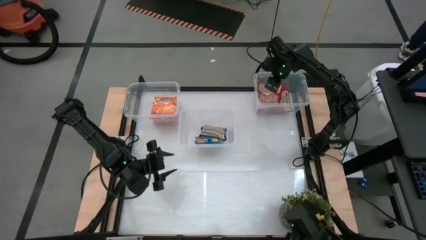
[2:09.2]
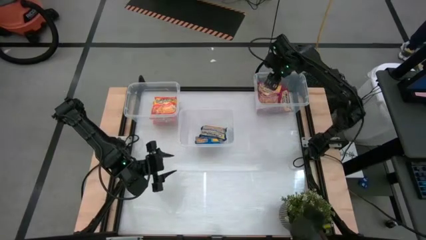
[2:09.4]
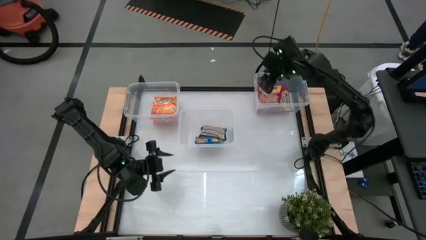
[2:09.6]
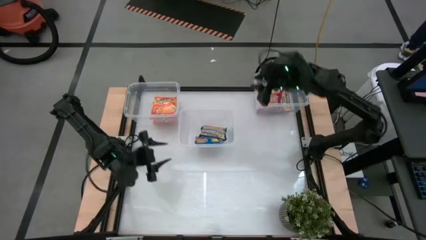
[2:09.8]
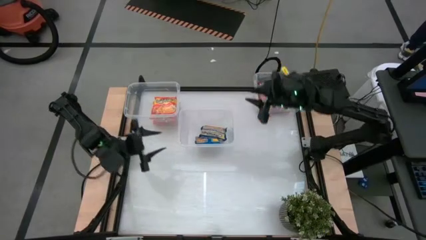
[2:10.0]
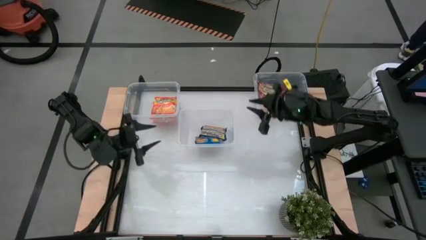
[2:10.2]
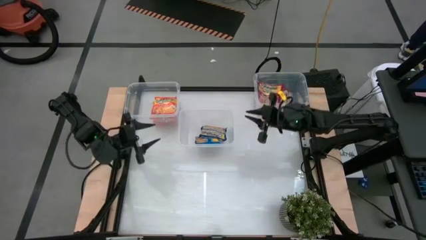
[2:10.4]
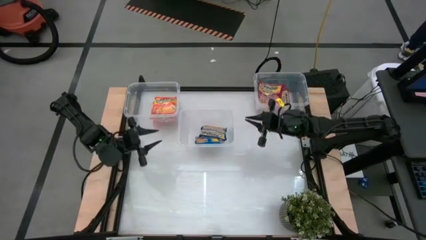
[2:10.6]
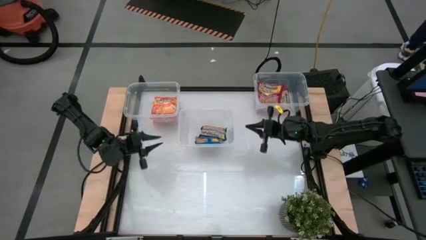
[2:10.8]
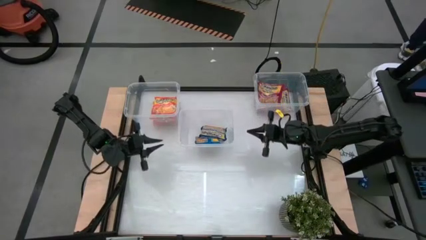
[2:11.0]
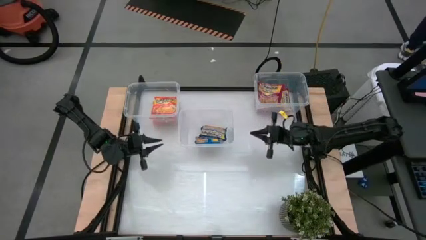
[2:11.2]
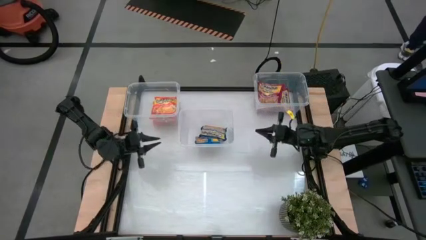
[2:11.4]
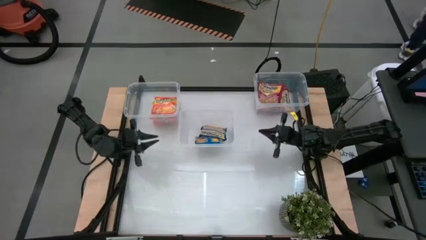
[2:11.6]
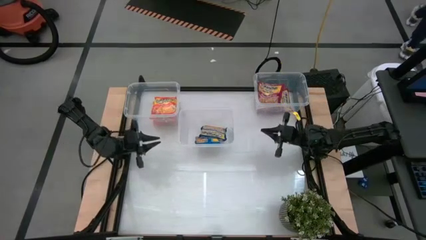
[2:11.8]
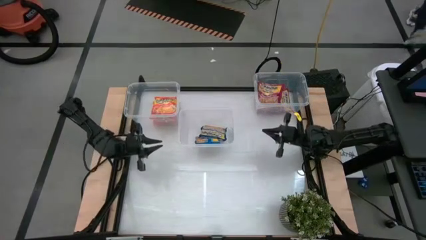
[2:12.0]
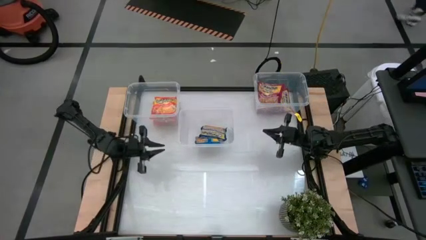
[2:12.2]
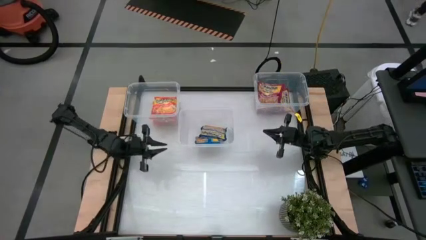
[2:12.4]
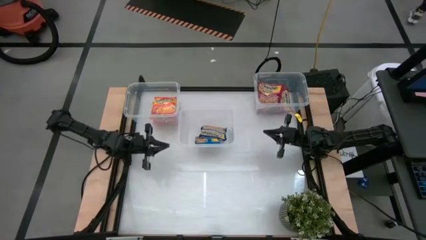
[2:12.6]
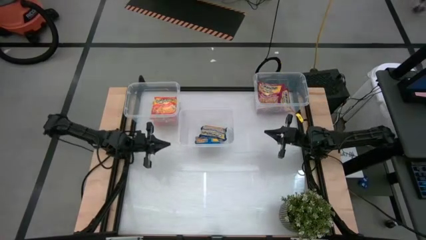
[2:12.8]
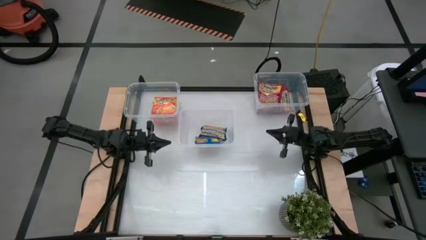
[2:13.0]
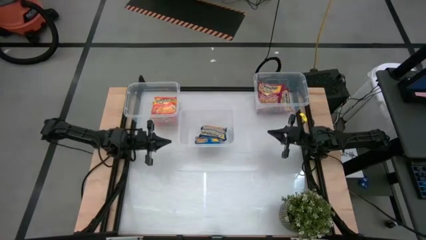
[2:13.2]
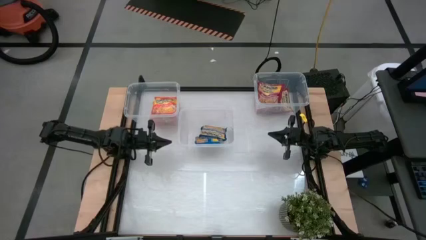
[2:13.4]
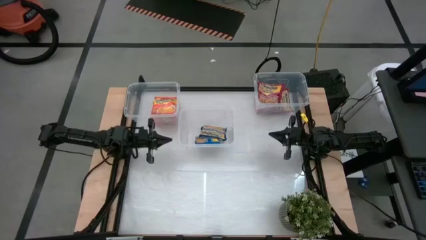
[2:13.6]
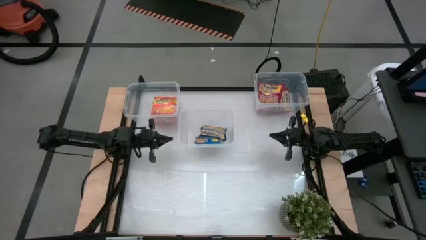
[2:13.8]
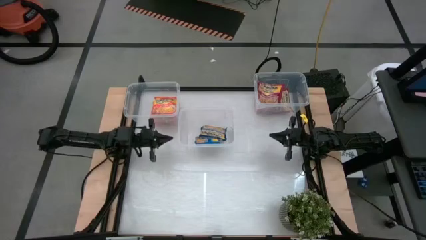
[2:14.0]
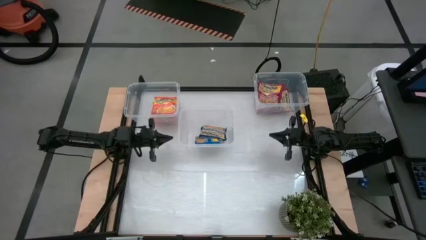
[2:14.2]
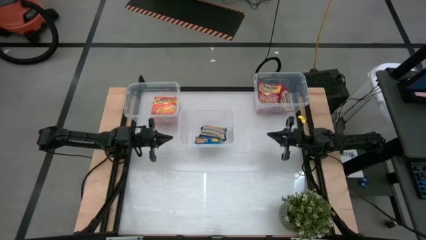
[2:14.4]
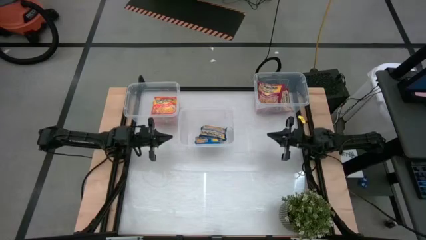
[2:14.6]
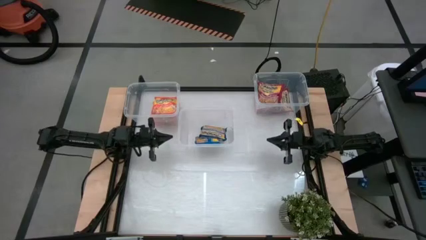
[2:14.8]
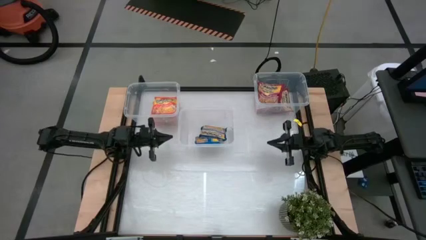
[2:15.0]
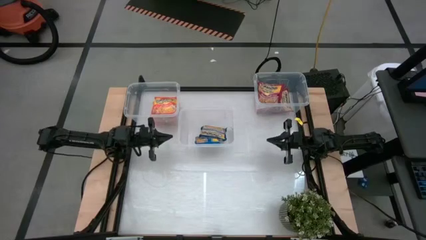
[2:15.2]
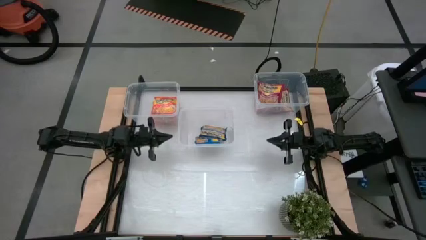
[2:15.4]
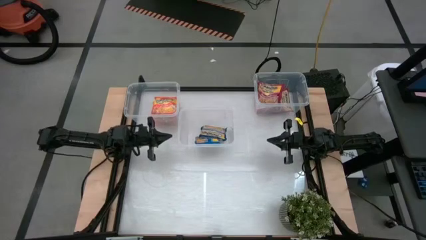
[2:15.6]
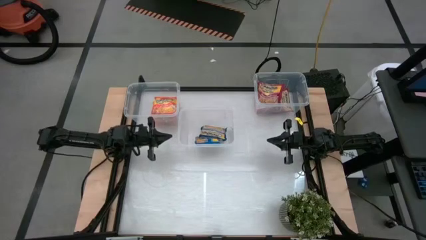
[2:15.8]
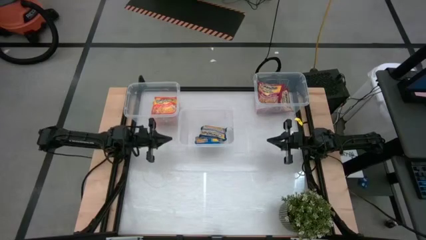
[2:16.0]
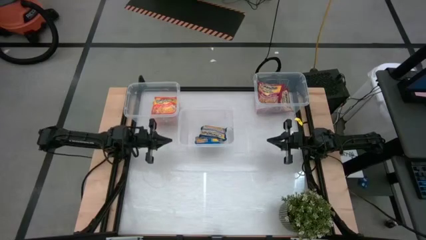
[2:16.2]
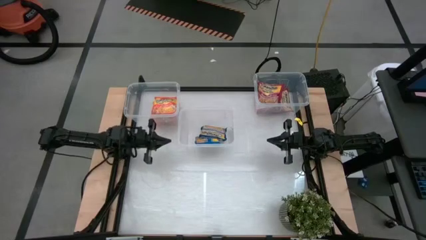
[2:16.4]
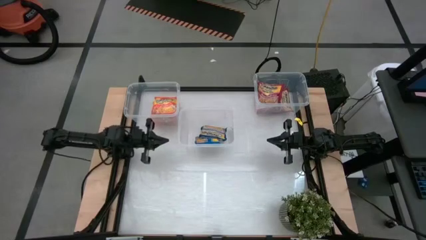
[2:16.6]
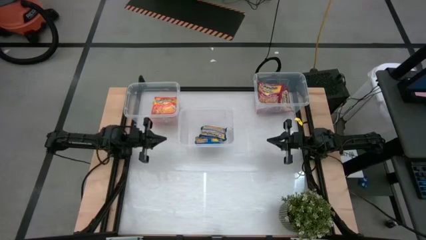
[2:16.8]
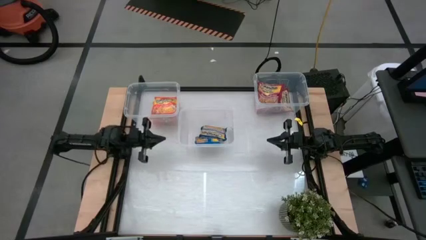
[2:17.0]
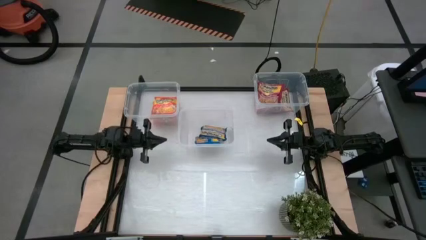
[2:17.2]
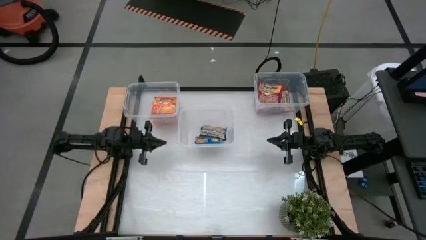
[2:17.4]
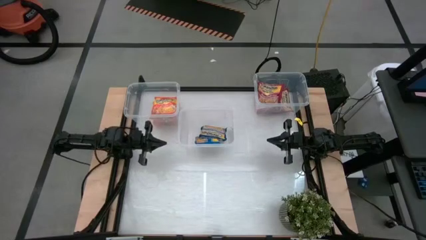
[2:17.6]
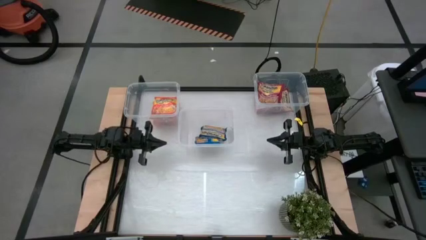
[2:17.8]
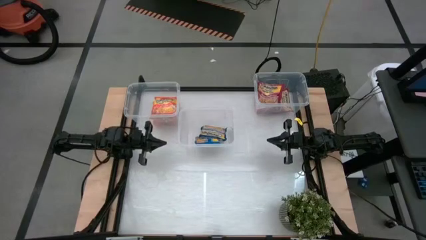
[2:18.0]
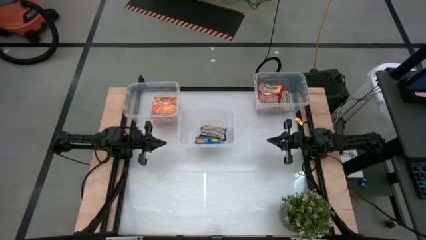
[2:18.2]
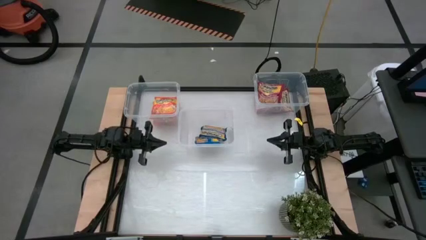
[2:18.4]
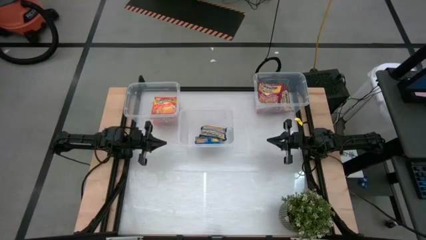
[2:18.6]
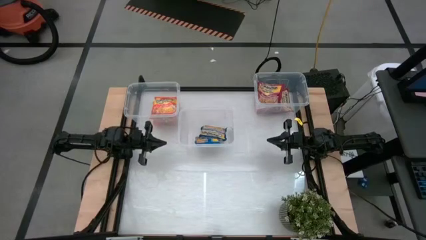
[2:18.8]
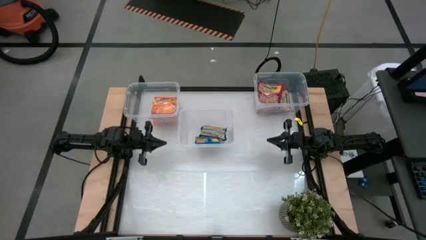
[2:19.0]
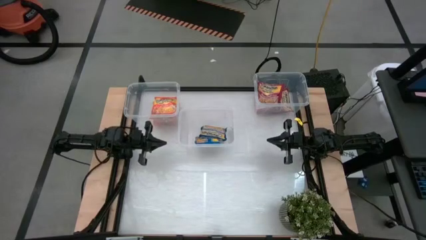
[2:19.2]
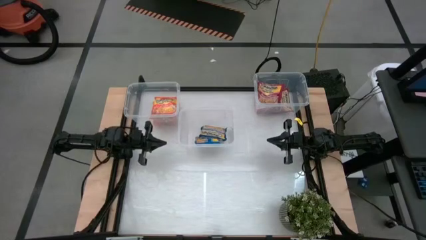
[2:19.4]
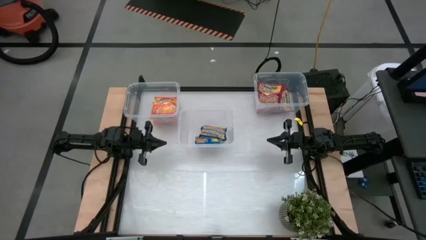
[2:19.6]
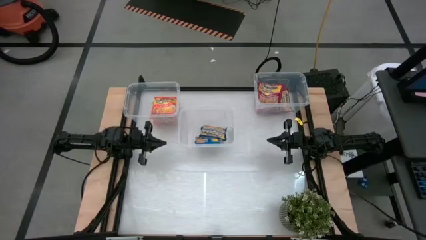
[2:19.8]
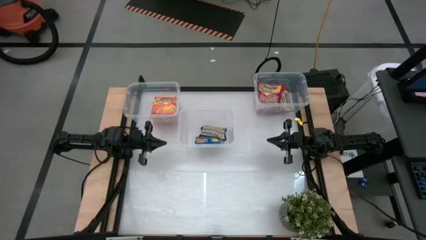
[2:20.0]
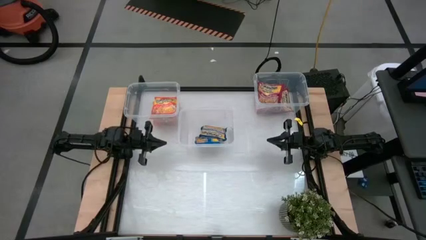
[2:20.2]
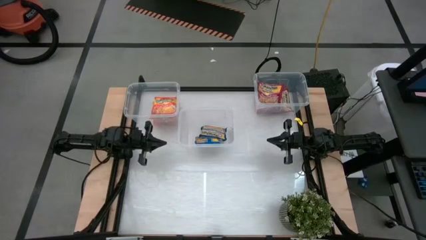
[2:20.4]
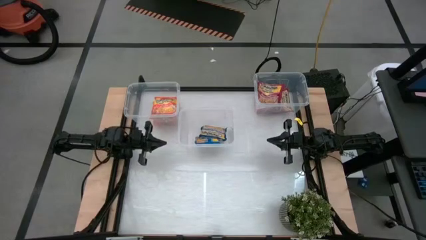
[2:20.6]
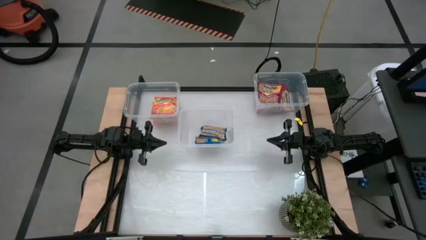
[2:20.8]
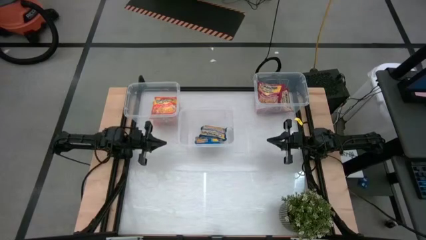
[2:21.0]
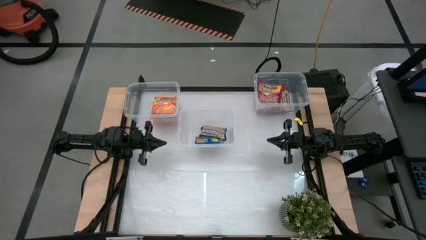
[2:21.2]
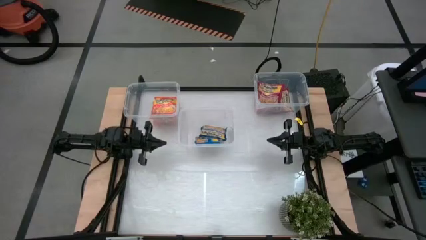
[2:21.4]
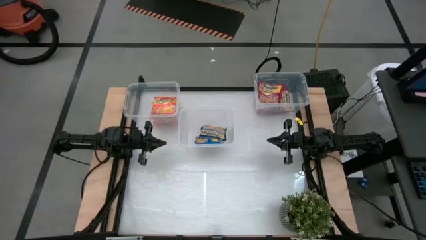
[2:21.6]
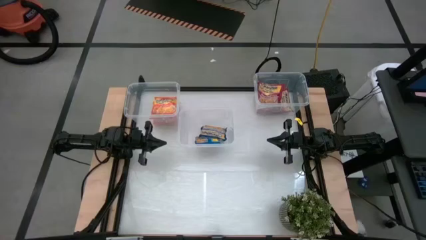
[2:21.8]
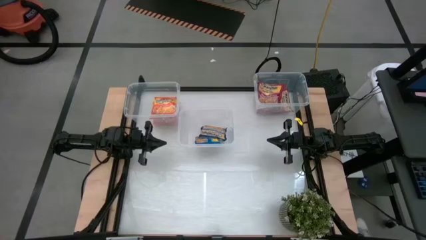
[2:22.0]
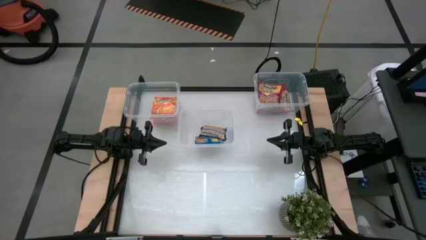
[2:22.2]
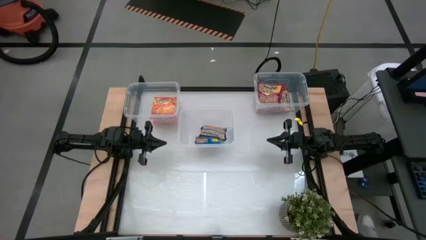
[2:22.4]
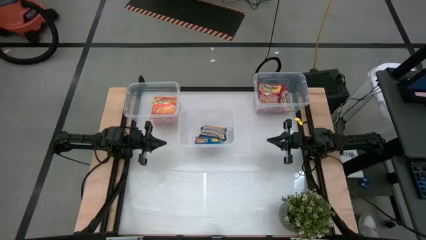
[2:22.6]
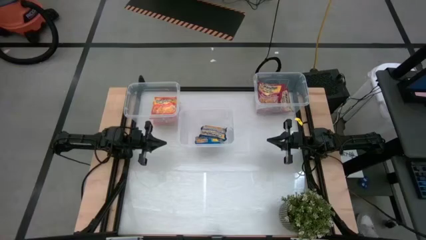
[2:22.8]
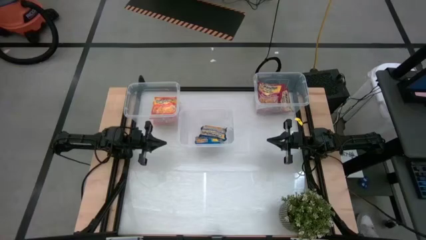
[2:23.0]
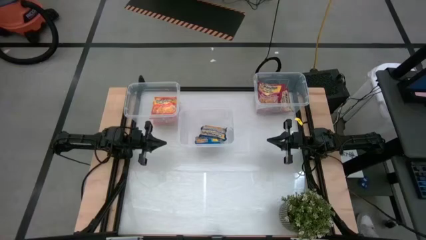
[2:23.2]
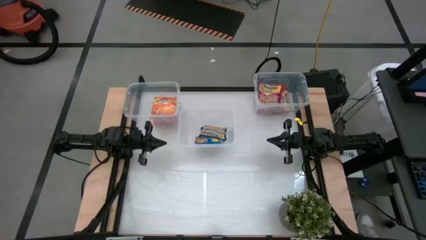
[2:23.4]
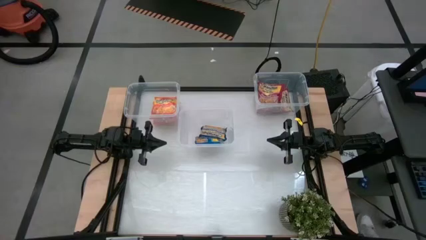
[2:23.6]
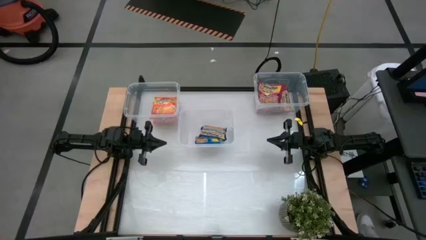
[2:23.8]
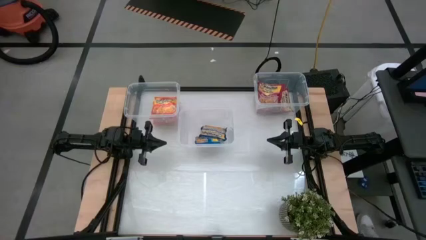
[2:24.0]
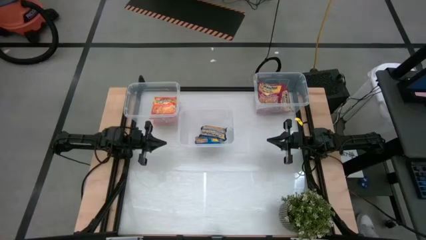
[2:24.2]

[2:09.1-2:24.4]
Task: Sort Maruchan noodles
Return to Home Position
